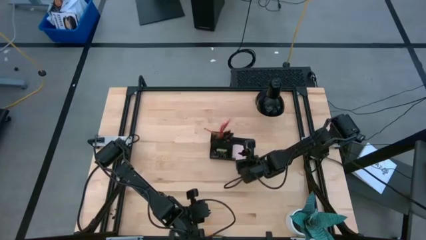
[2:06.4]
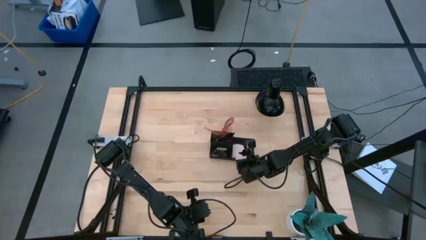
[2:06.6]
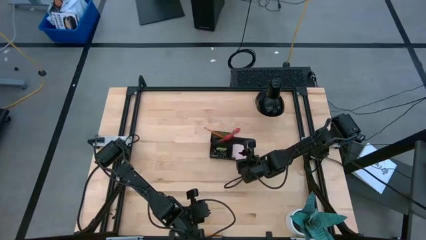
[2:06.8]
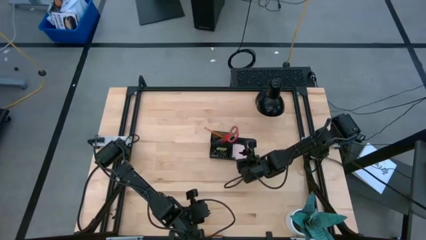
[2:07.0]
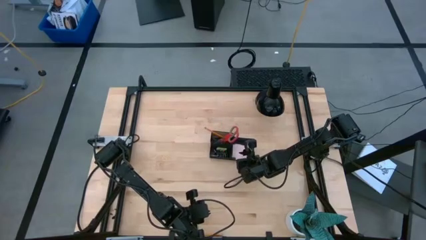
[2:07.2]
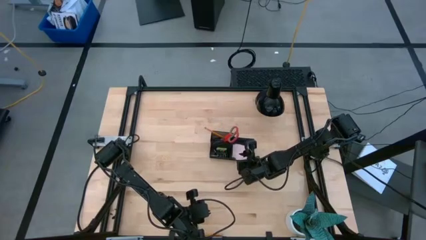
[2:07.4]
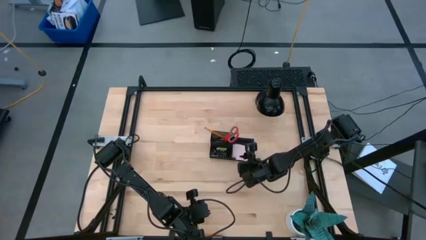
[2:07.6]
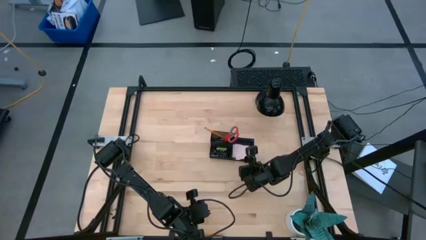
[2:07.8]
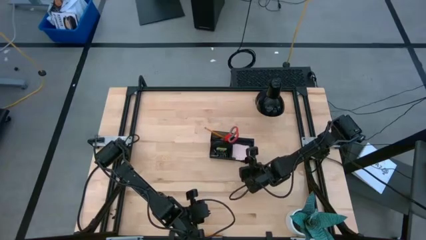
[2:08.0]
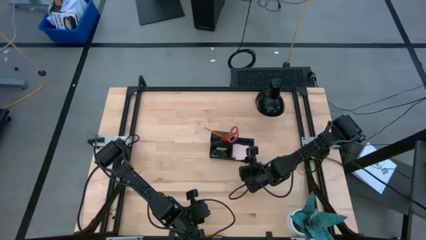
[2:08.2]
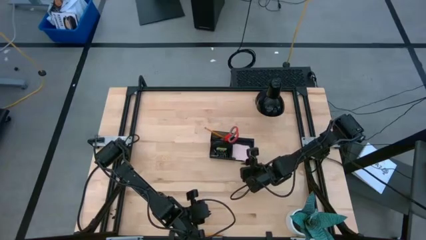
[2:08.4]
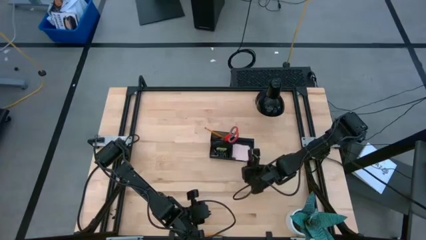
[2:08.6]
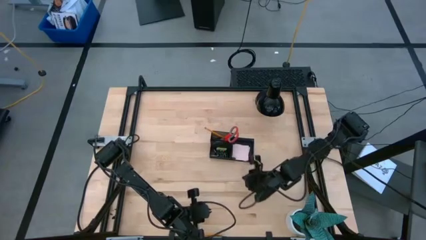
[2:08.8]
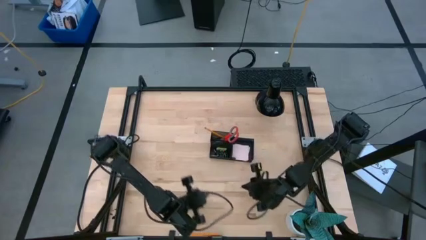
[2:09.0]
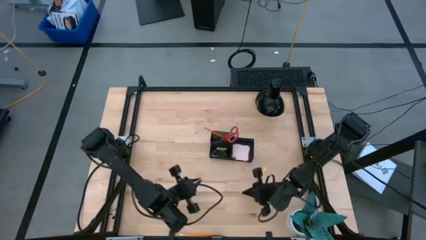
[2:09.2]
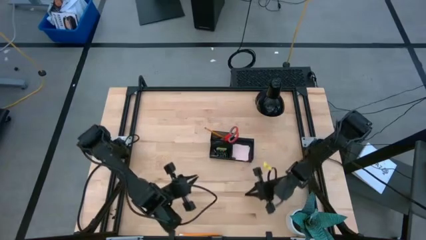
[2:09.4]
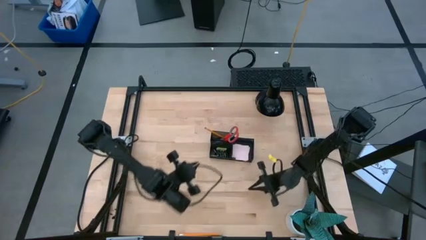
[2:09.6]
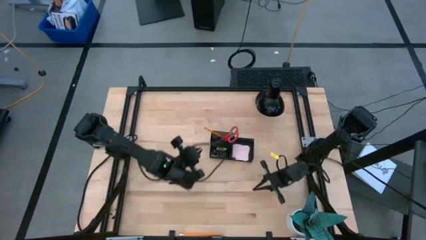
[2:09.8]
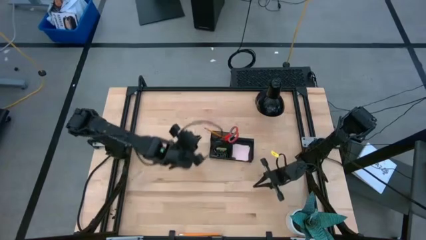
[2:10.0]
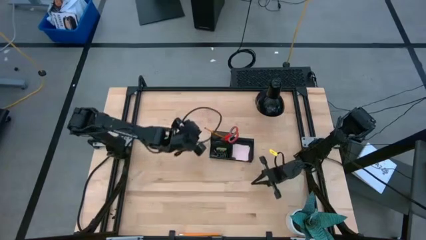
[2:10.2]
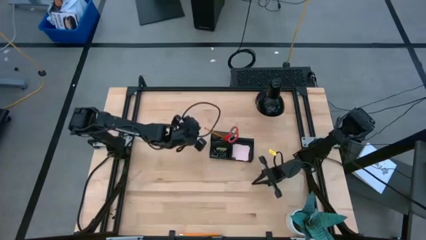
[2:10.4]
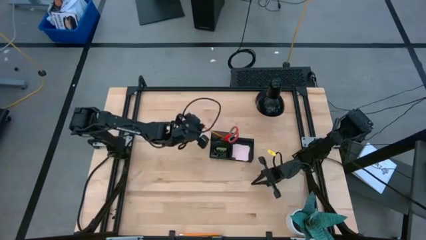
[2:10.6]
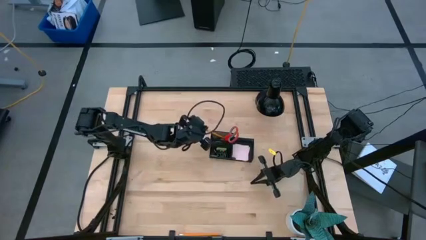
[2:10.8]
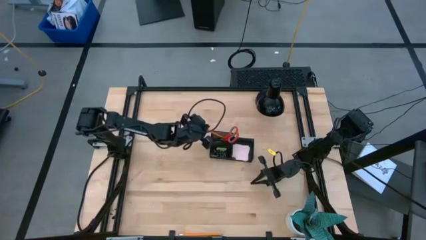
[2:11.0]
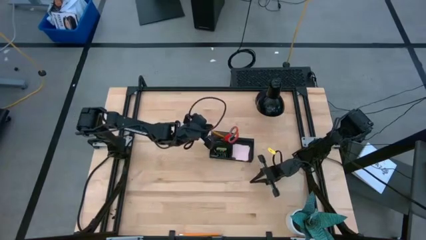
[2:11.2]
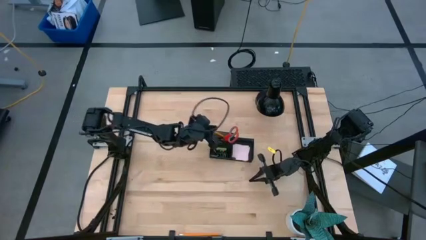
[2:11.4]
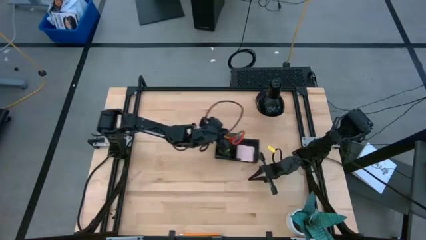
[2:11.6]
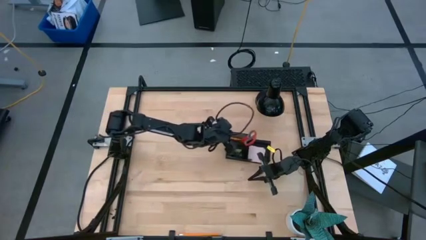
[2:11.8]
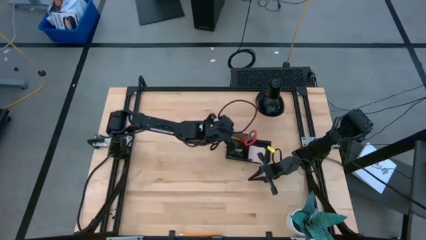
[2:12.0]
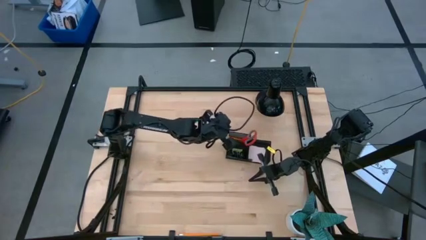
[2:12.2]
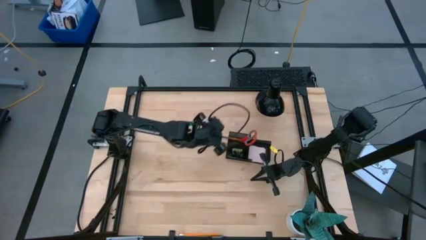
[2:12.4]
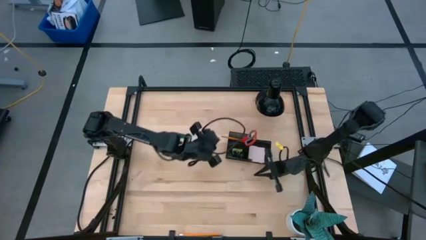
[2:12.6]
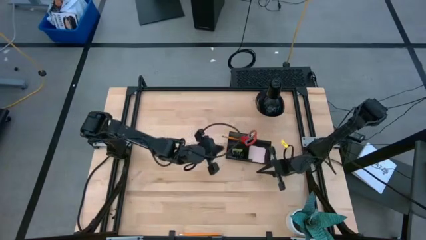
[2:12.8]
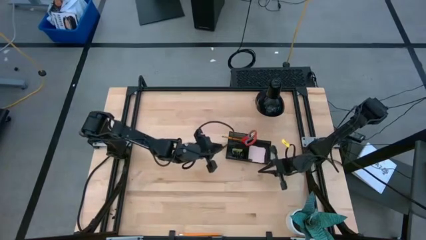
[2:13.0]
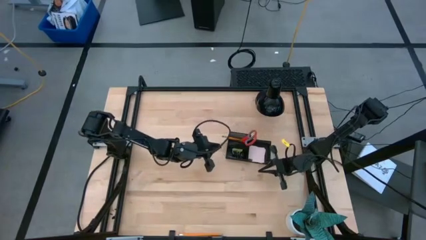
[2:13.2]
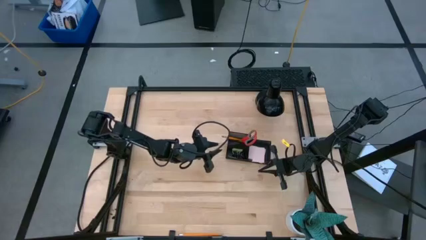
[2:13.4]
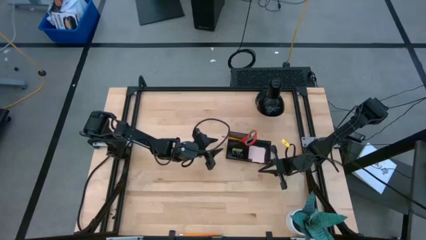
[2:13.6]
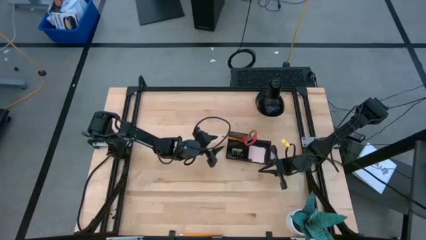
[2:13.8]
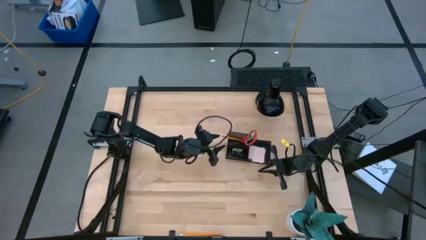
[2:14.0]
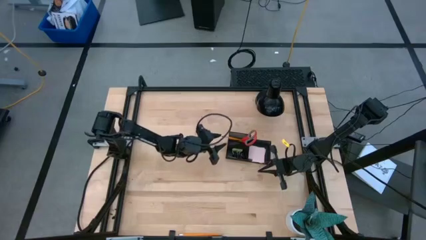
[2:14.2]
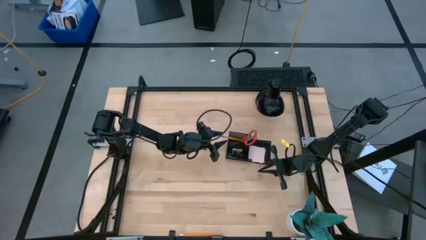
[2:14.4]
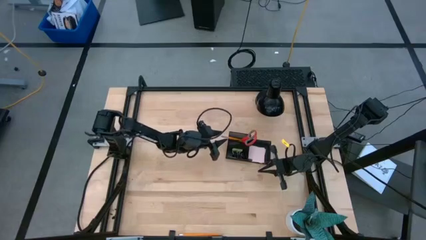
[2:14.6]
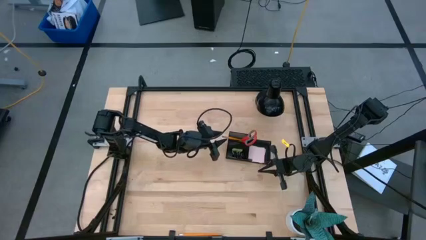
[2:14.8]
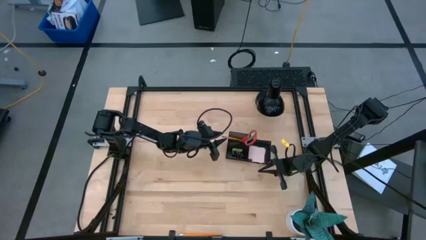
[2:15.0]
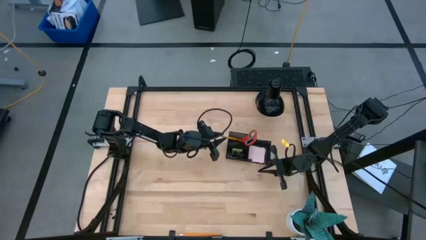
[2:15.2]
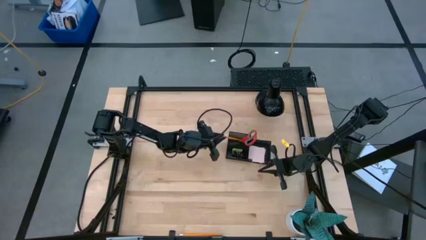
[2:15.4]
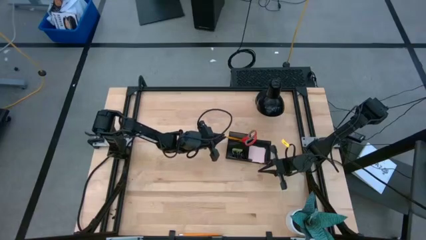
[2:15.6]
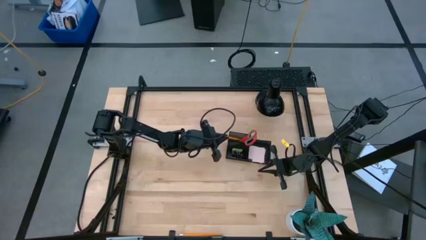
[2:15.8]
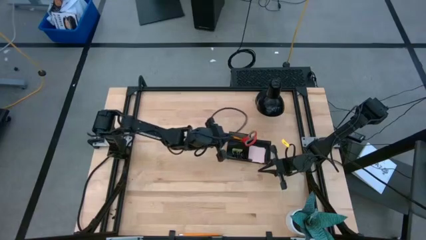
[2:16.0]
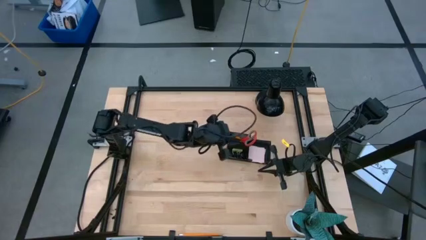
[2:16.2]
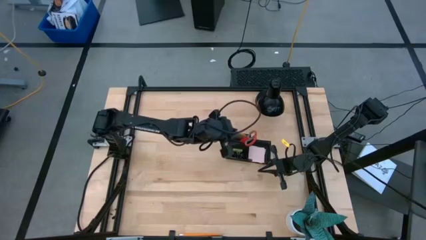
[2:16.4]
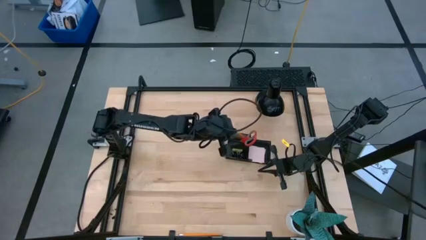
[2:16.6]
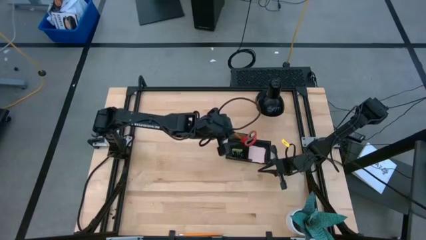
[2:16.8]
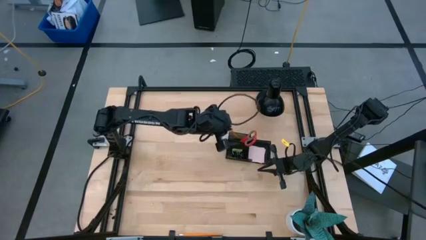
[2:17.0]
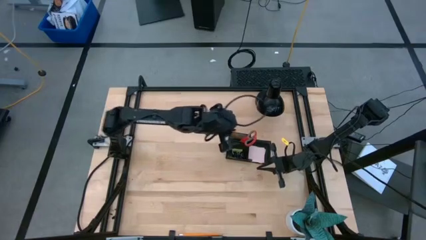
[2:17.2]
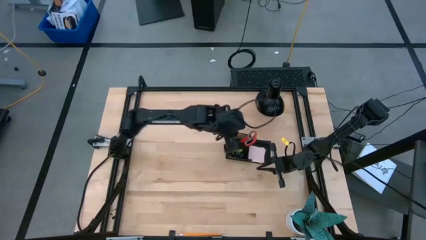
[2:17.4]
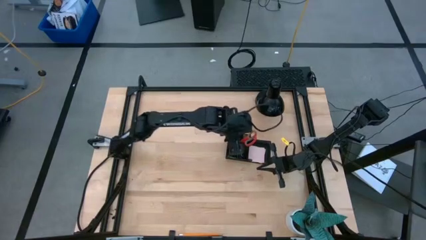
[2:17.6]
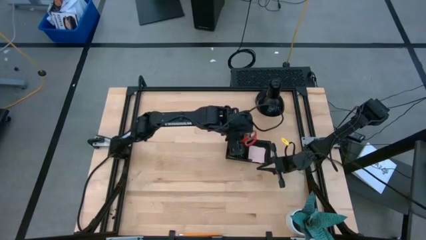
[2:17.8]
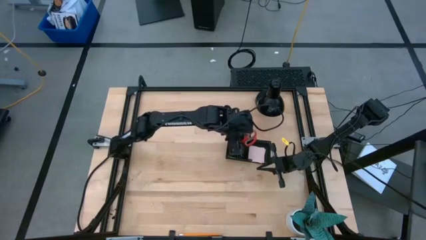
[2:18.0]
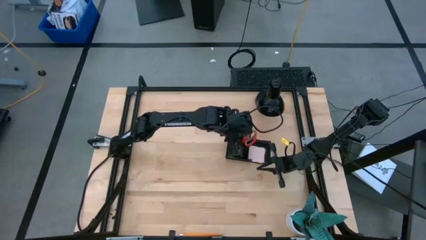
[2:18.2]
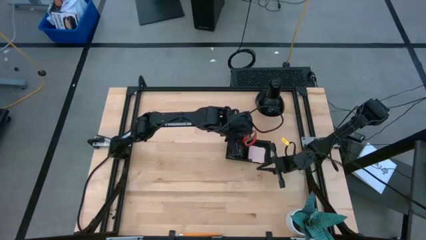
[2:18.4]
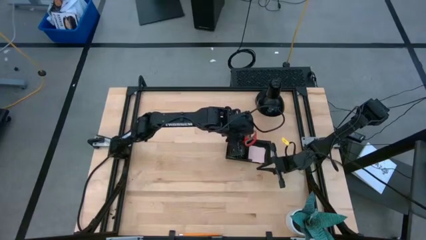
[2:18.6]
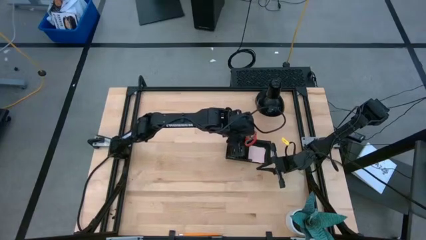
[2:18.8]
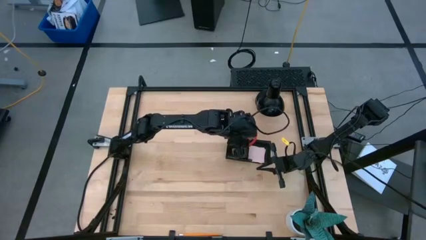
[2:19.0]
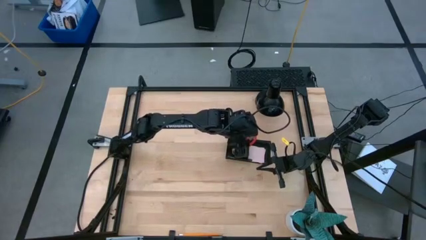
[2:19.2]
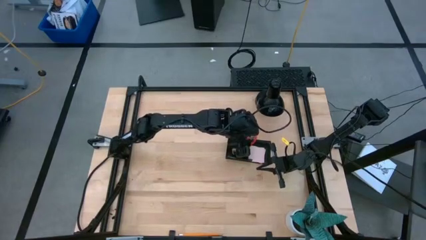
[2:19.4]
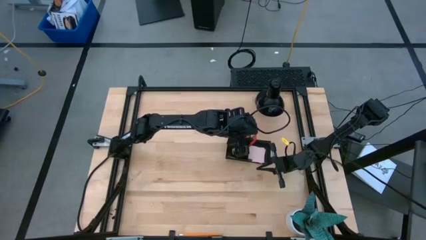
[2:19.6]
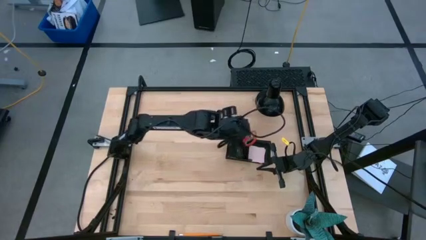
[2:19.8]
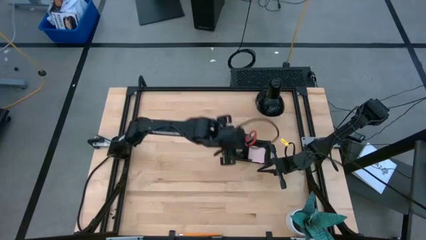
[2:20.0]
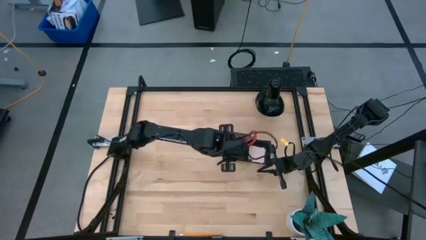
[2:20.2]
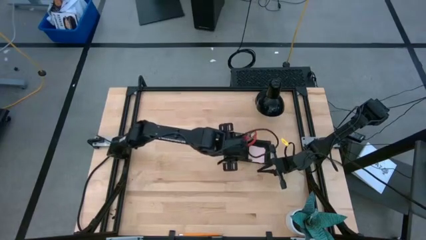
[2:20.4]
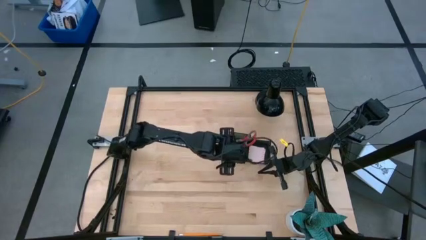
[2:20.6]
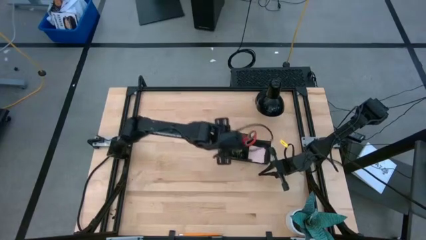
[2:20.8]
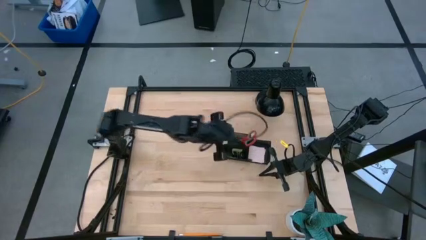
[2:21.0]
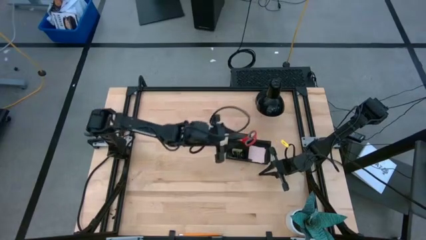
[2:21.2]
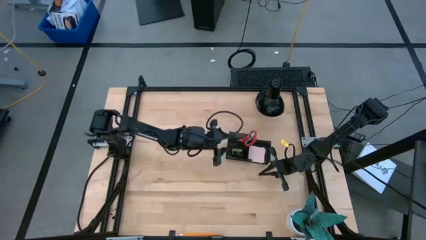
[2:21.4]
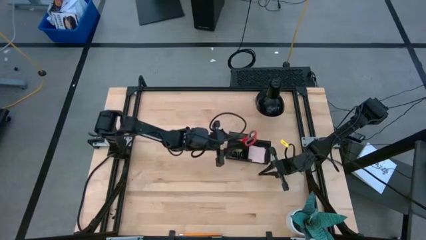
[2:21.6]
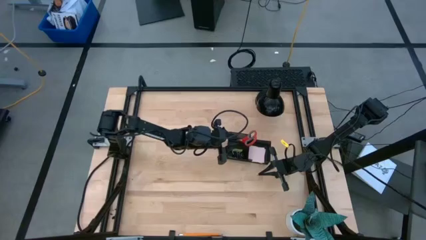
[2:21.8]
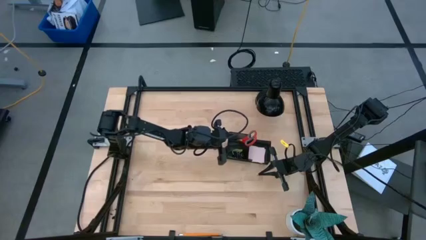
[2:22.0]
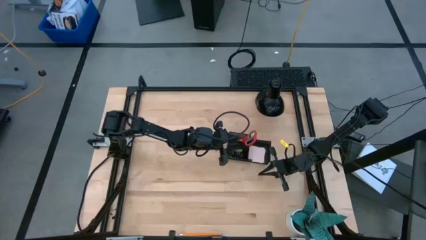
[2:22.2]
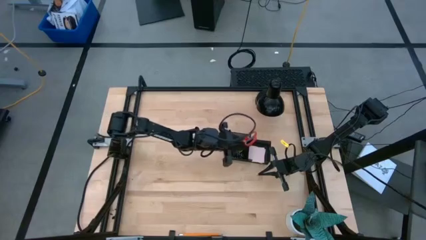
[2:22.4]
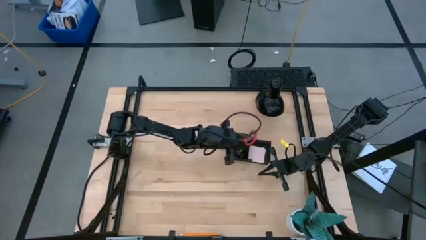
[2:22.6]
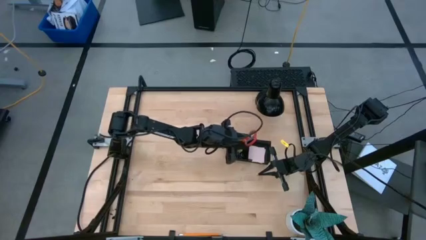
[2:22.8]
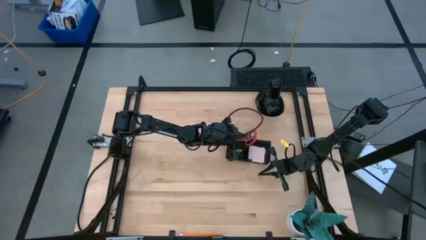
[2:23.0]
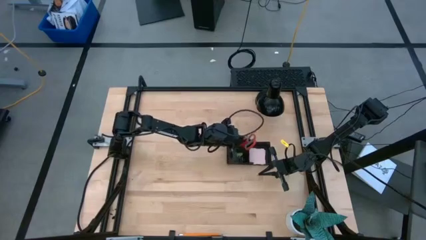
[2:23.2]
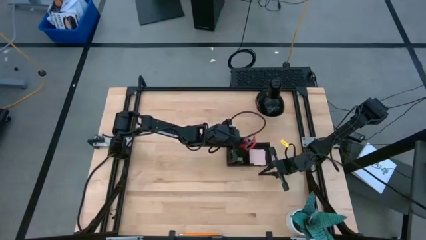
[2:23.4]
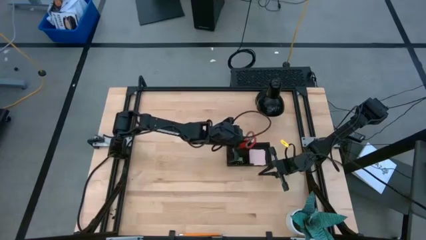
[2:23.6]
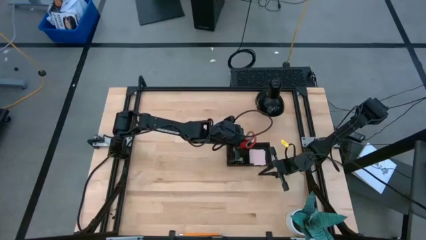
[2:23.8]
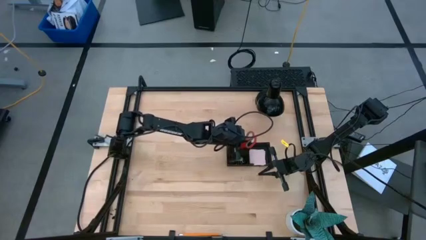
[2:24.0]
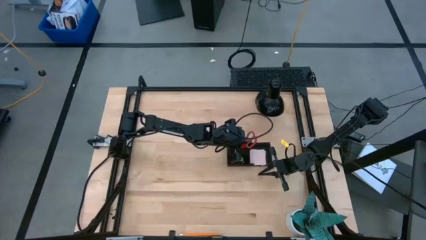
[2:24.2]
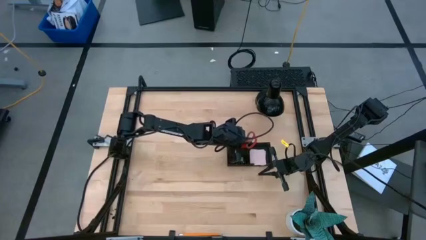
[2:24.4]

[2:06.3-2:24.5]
Task: Pick and place office supplies into organizer
Adjust the yellow pencil in the black desk organizer
